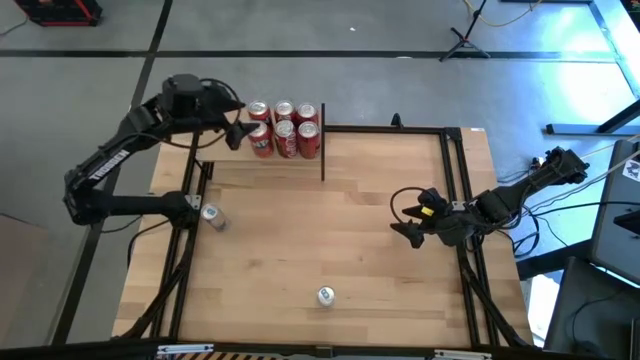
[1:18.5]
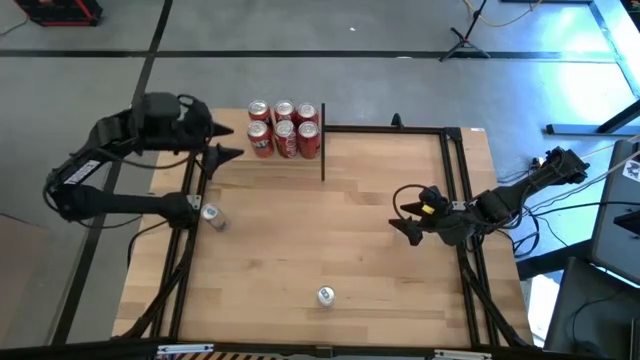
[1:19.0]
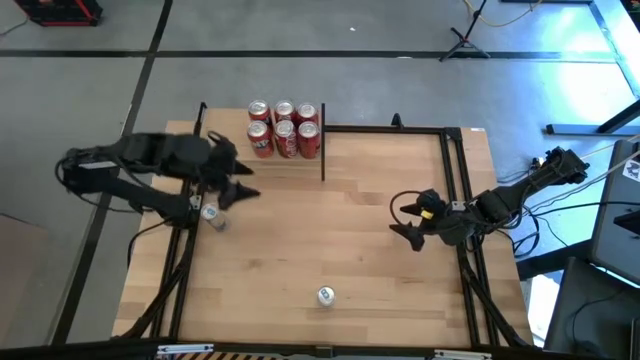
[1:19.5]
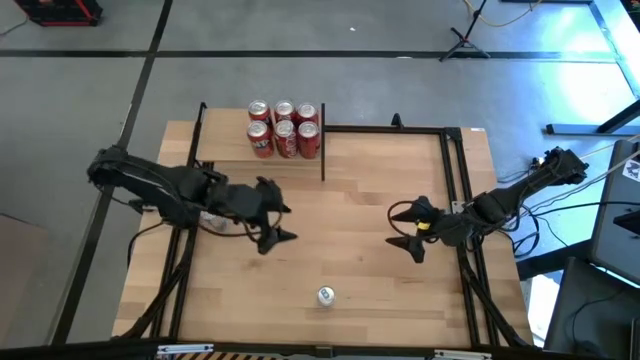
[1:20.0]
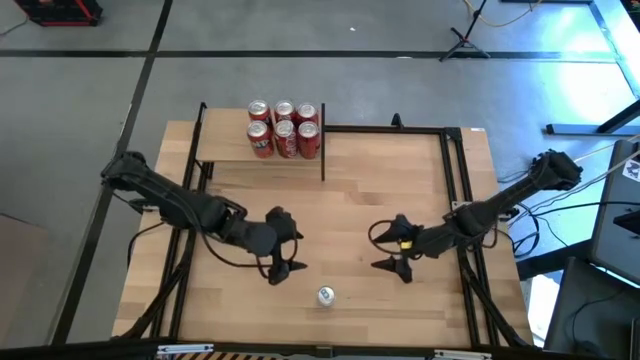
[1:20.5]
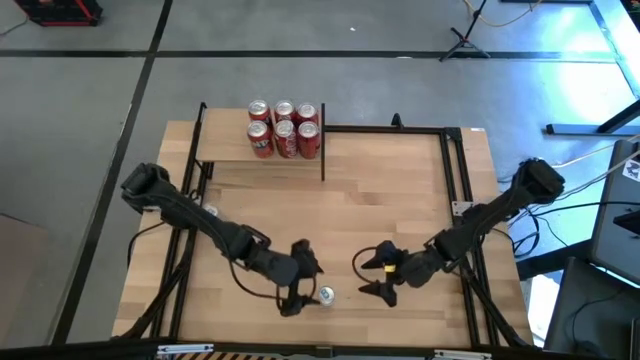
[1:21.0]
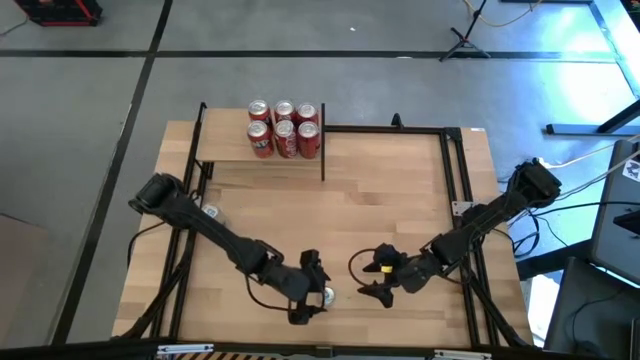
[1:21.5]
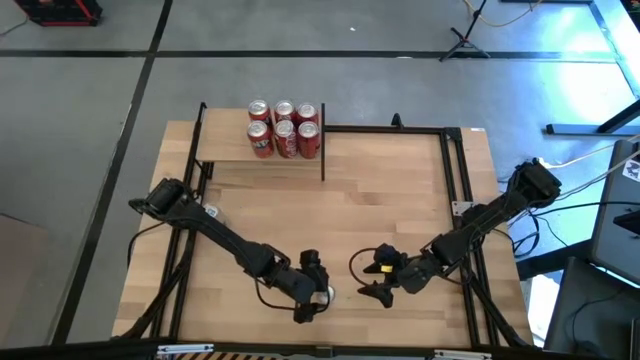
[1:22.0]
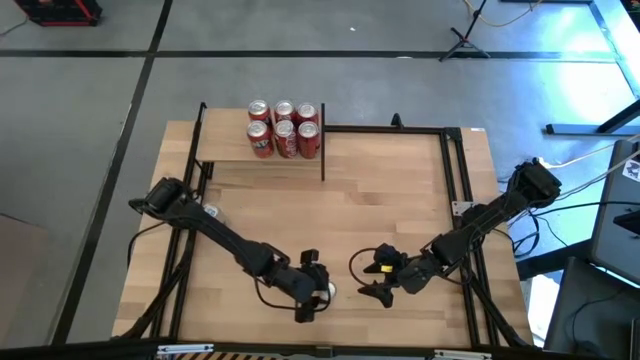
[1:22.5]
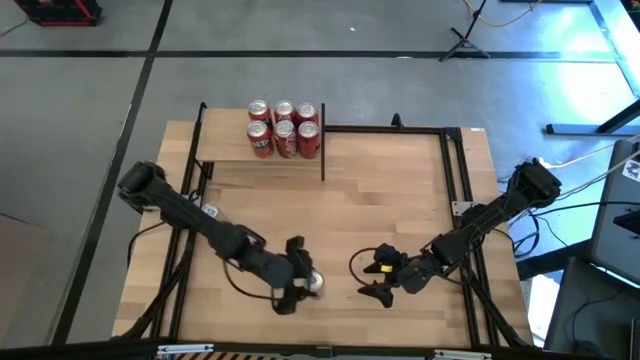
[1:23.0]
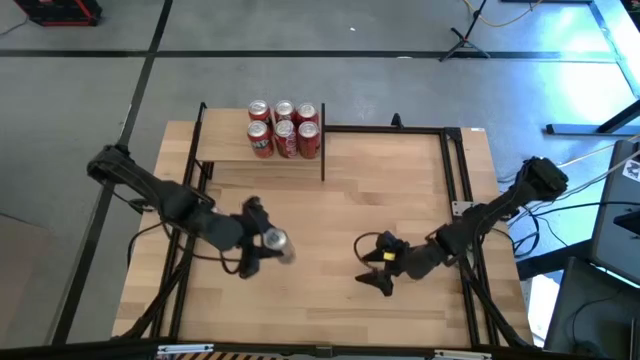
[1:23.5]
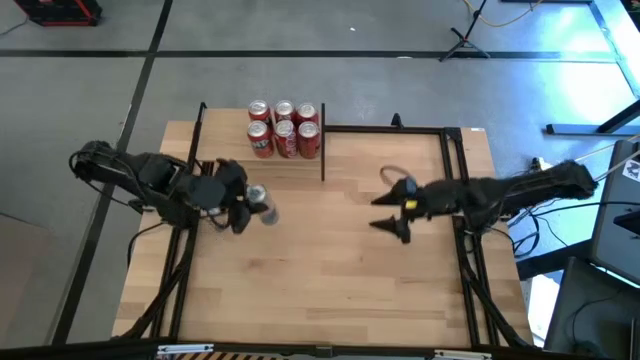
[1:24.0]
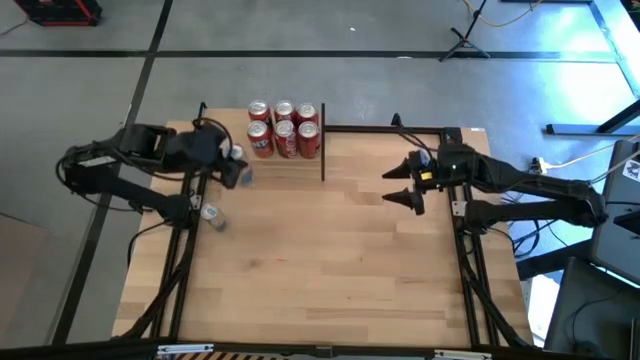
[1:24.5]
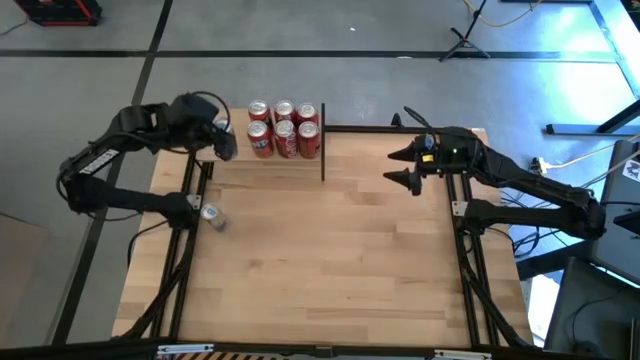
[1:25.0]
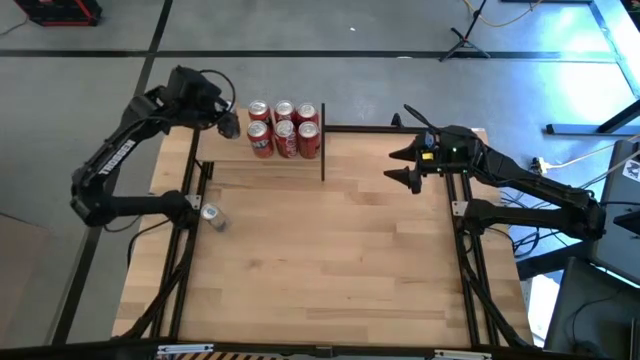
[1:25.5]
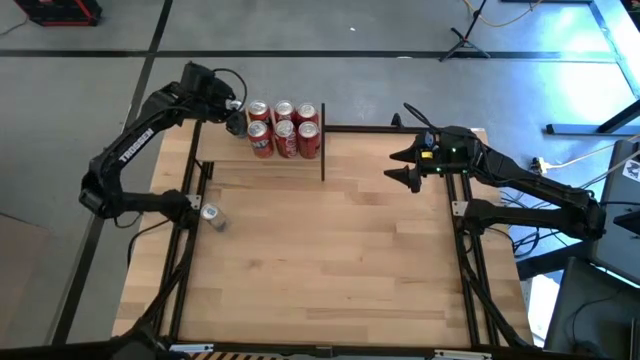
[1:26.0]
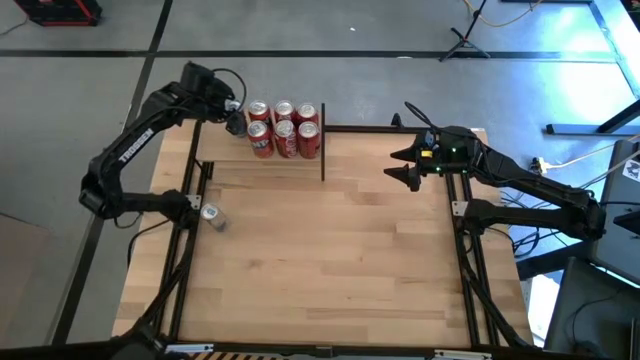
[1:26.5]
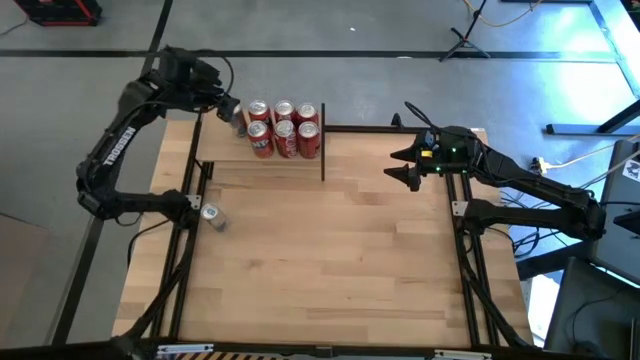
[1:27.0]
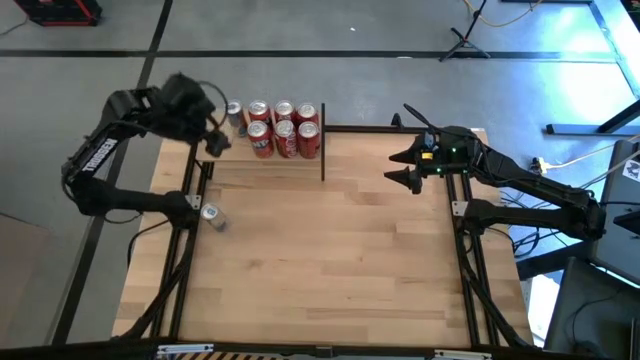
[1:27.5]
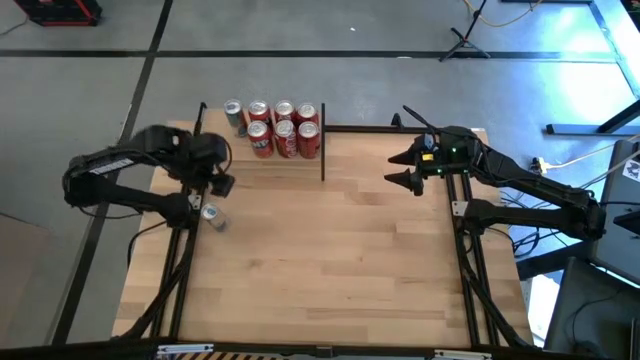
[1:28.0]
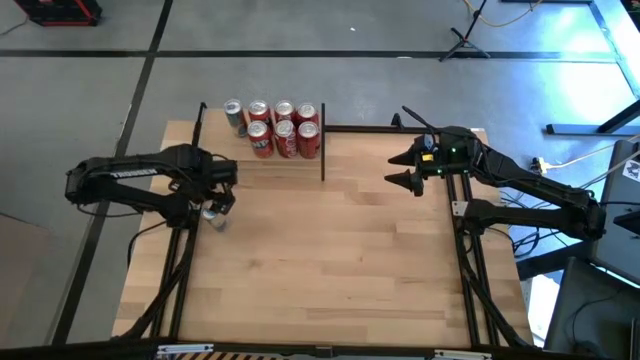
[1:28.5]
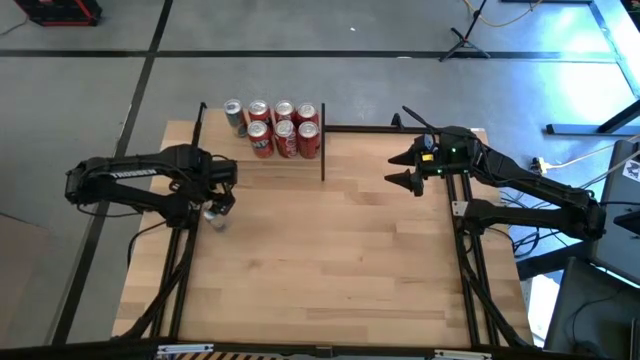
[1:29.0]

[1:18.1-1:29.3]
Task: Place canned beverage on shelf
Put the bottom blue soda can on the shelf

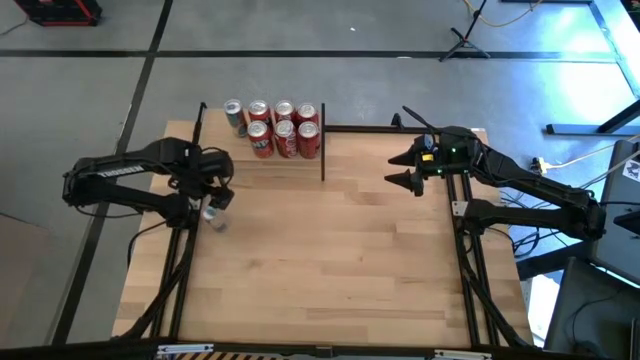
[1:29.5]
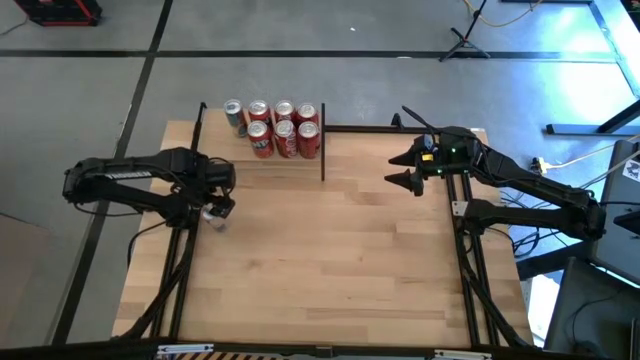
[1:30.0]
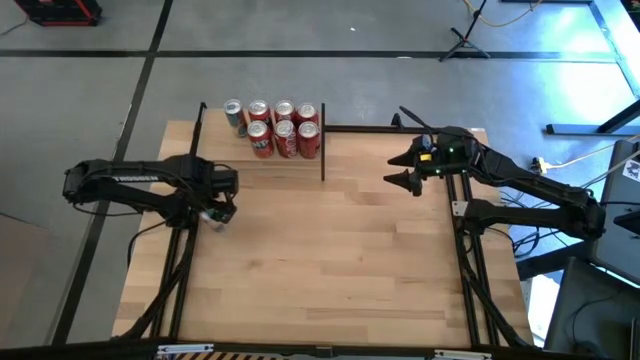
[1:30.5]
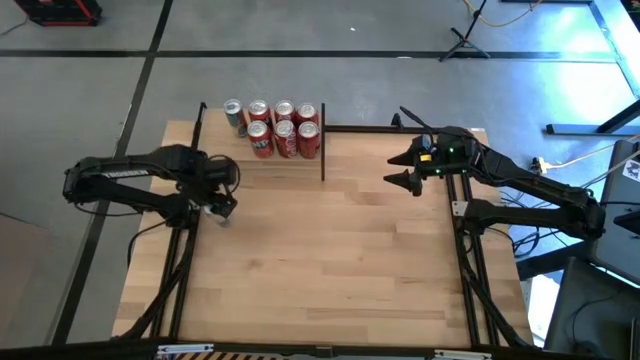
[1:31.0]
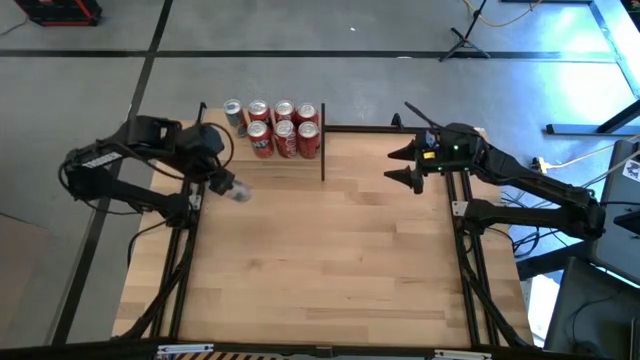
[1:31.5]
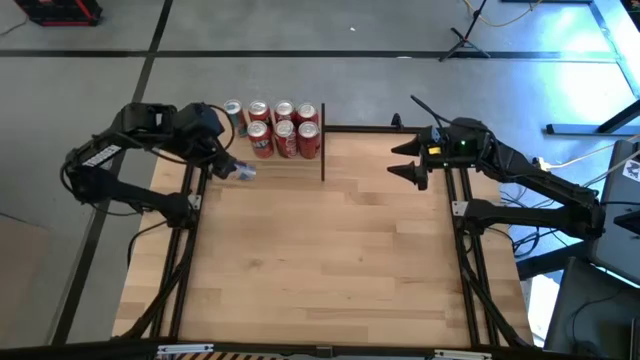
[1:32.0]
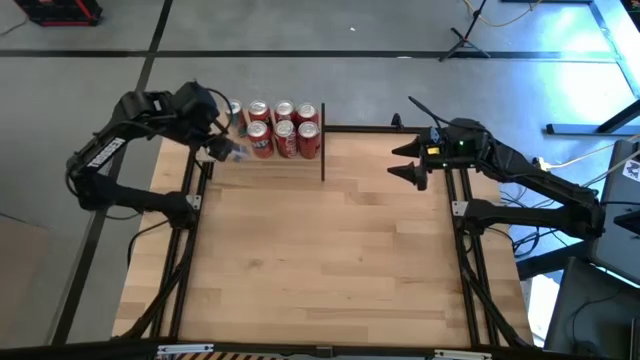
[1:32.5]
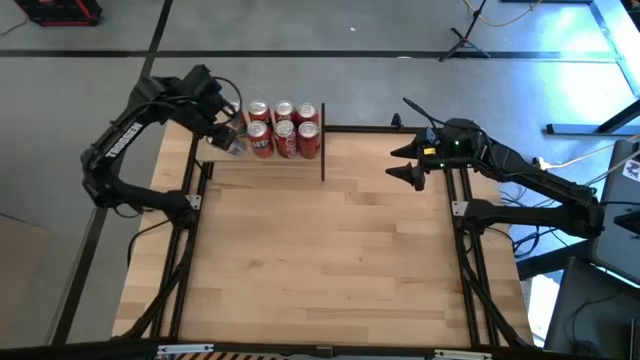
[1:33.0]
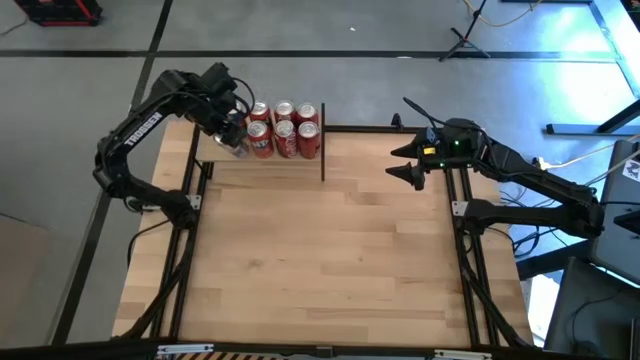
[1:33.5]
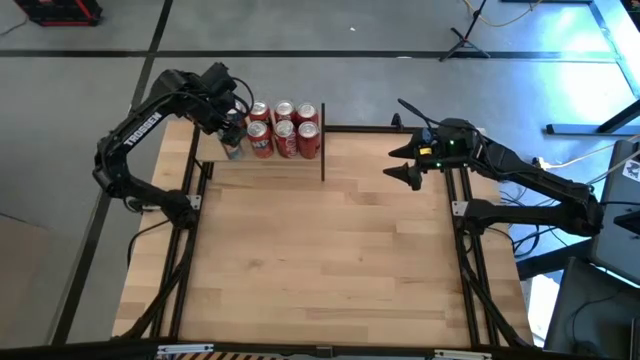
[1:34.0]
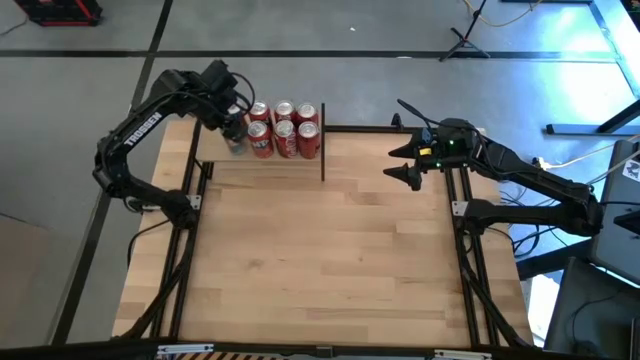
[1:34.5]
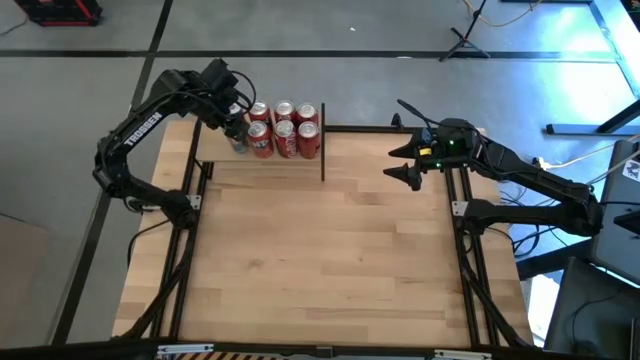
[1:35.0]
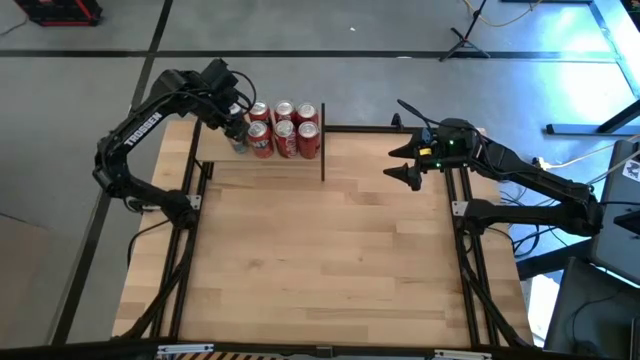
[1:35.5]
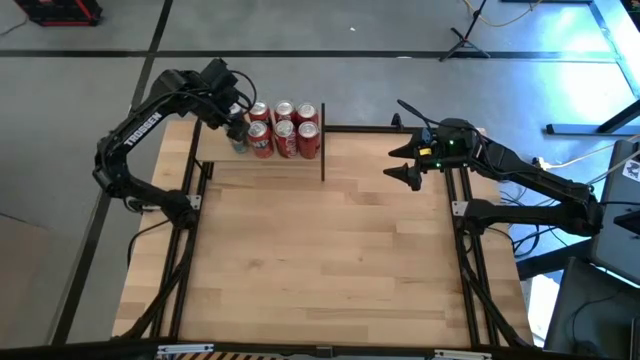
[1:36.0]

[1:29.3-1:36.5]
Put the blue soda can on the shelf aligned with the other blue soda can

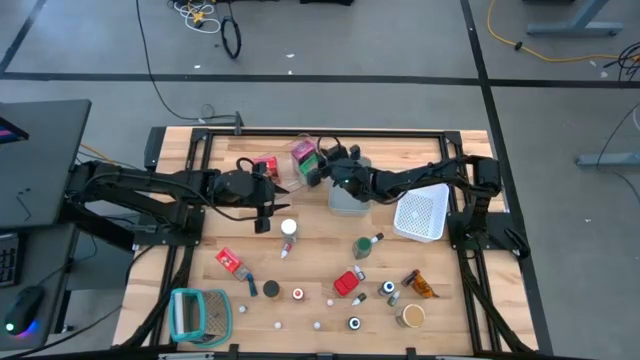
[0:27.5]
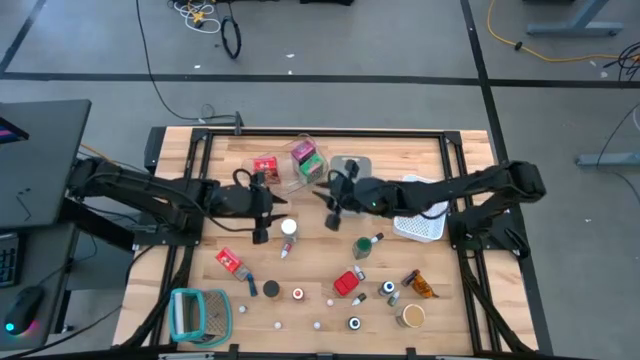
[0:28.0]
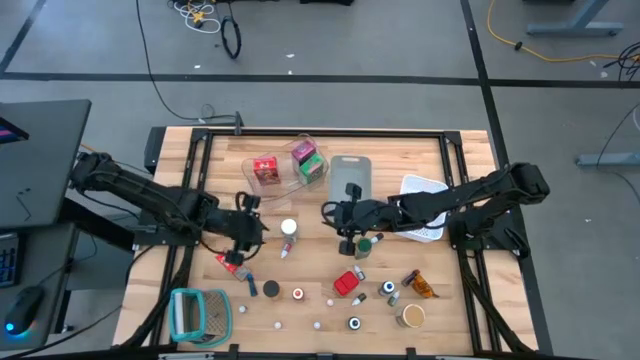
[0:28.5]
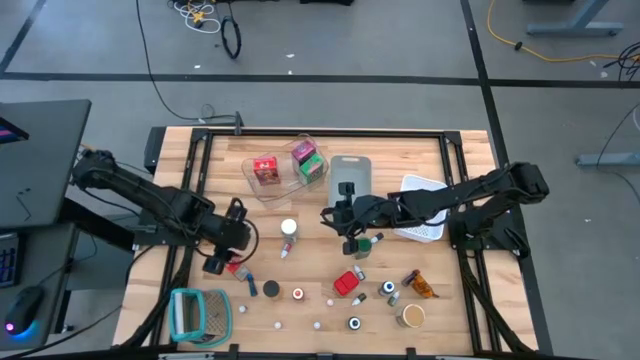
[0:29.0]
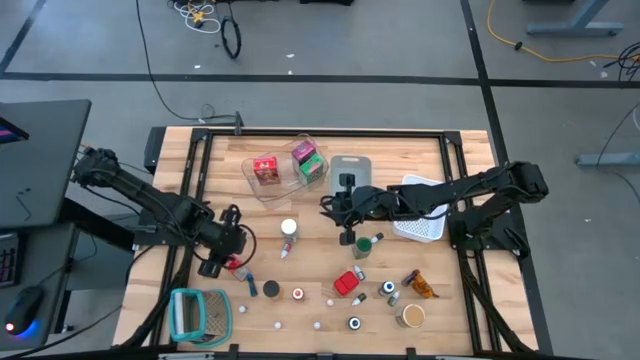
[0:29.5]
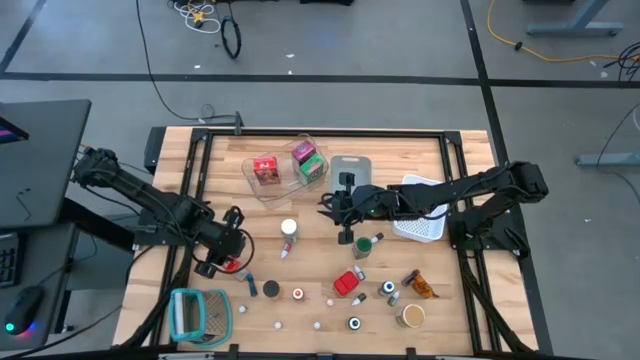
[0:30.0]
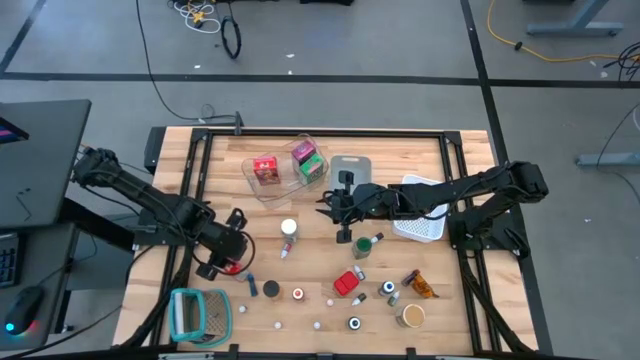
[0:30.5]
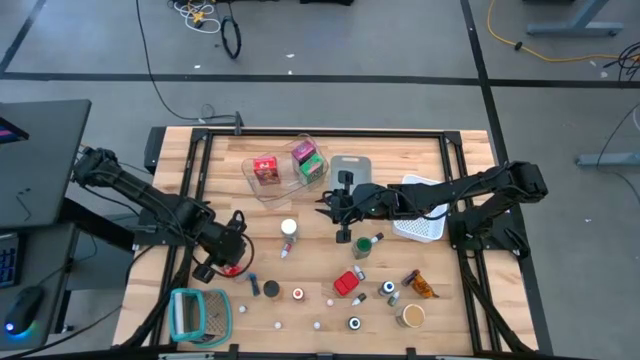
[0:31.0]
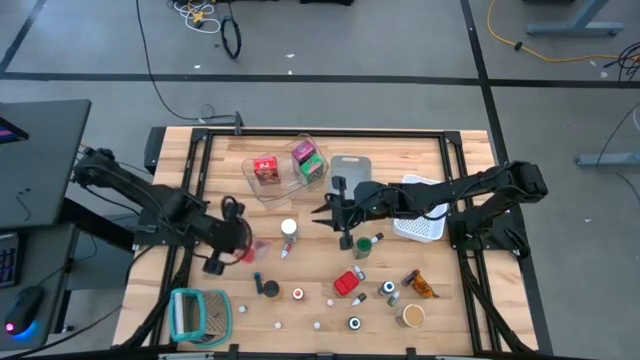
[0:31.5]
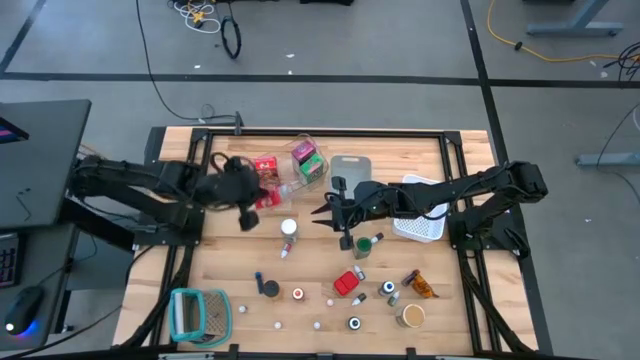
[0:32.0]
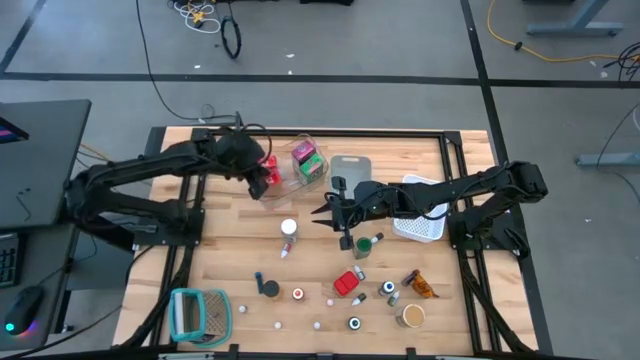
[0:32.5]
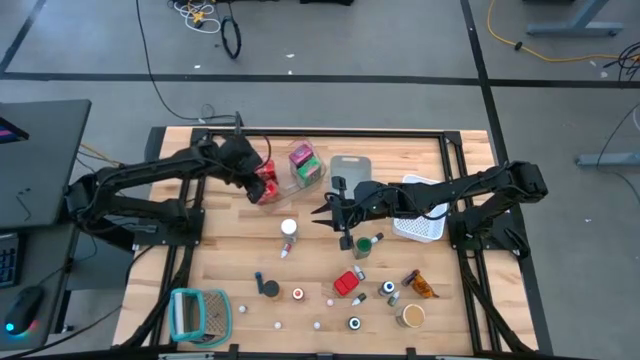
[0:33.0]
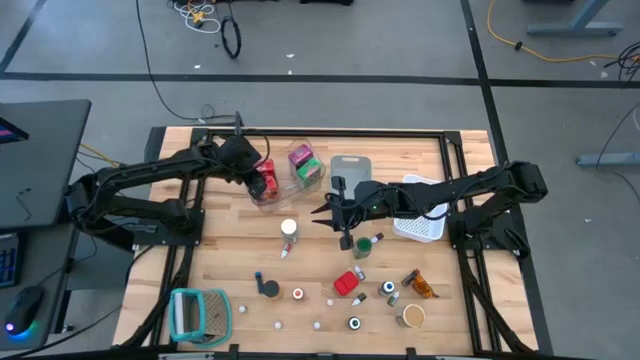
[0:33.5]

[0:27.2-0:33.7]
Task: Pick & Place Kitchen Items
Put the red cereal box into the transparent bin
